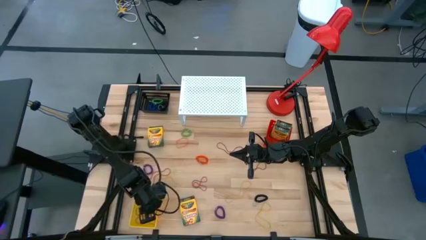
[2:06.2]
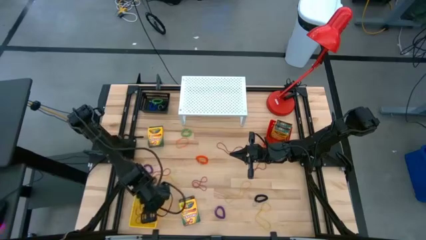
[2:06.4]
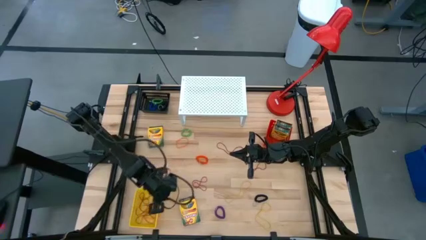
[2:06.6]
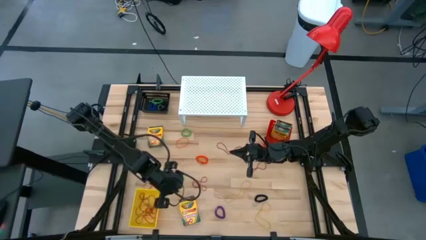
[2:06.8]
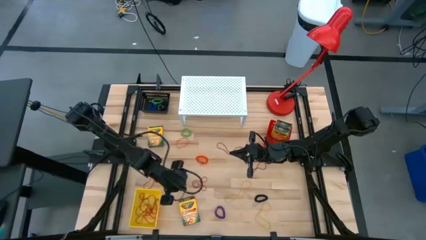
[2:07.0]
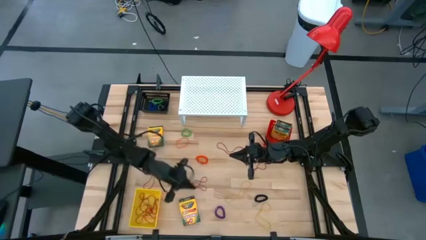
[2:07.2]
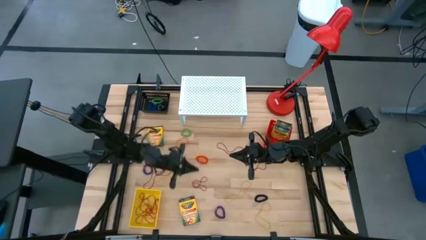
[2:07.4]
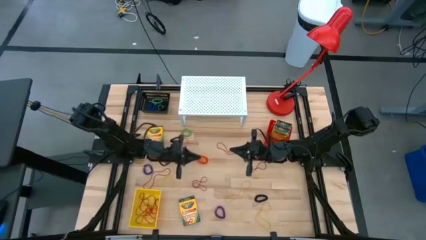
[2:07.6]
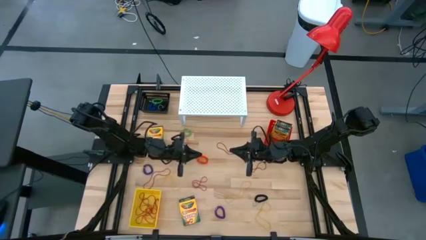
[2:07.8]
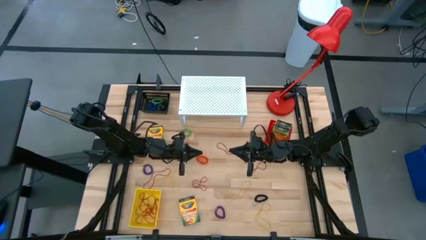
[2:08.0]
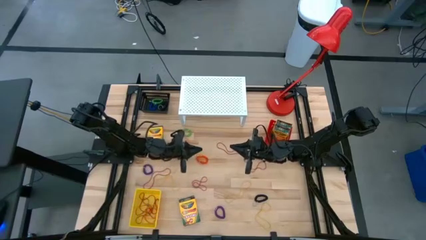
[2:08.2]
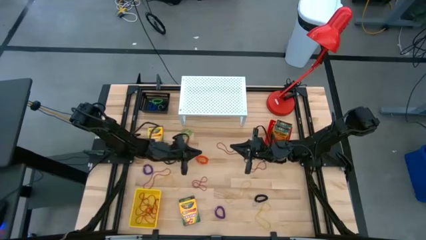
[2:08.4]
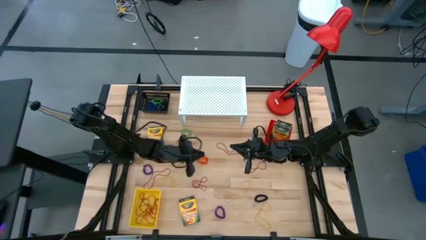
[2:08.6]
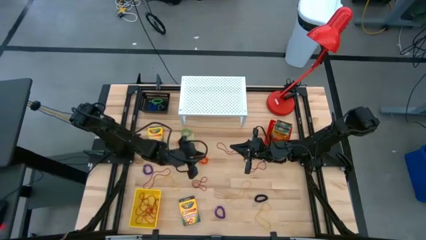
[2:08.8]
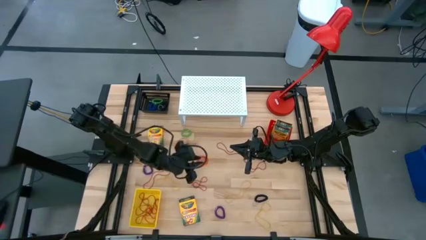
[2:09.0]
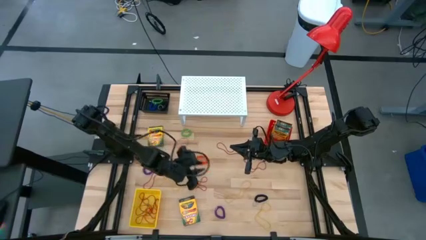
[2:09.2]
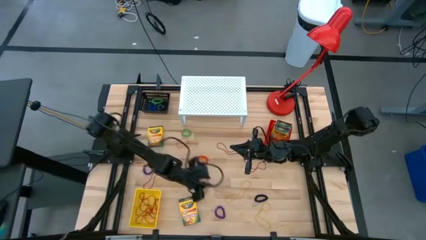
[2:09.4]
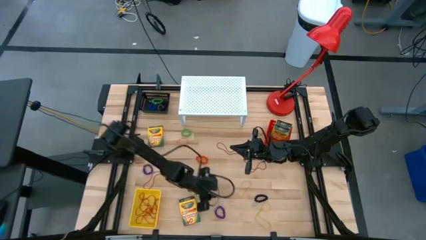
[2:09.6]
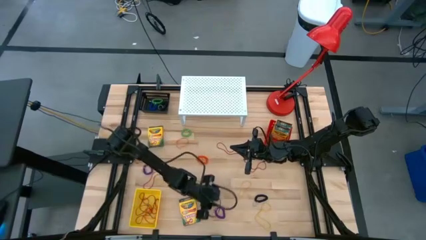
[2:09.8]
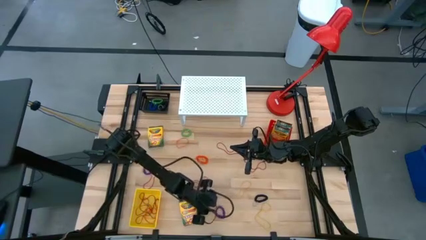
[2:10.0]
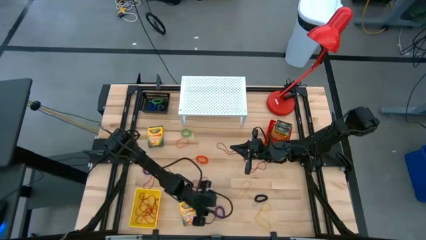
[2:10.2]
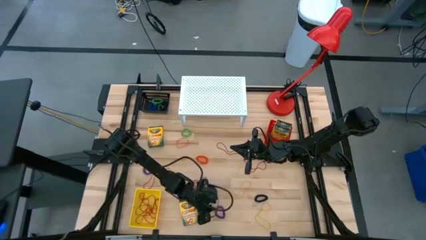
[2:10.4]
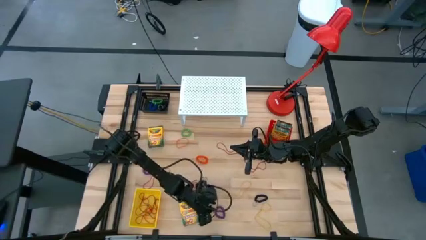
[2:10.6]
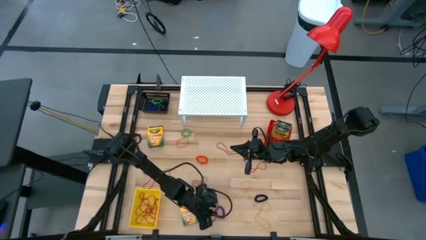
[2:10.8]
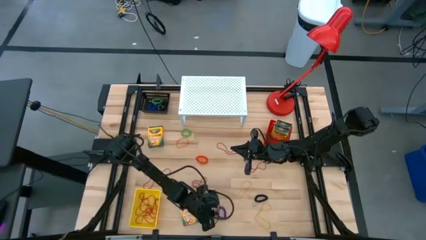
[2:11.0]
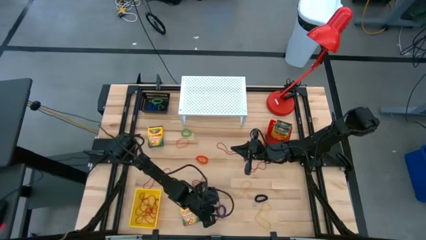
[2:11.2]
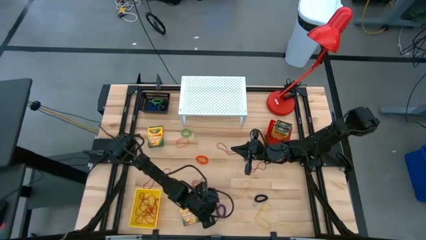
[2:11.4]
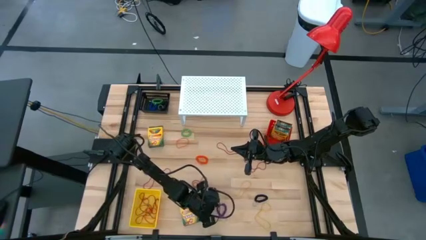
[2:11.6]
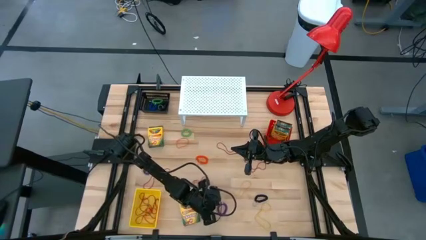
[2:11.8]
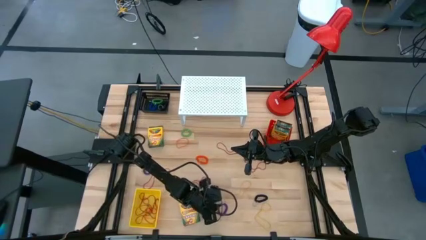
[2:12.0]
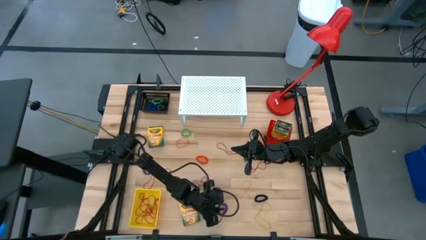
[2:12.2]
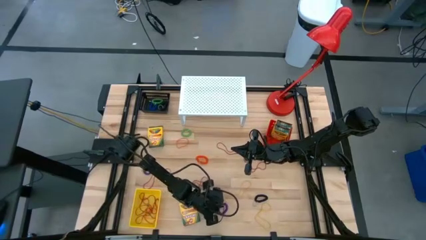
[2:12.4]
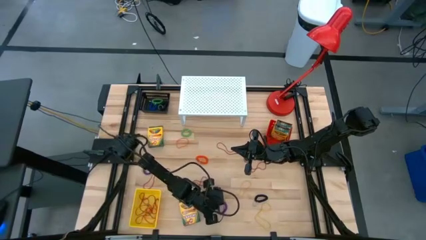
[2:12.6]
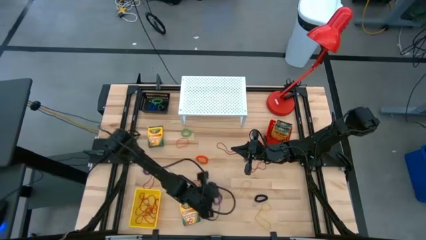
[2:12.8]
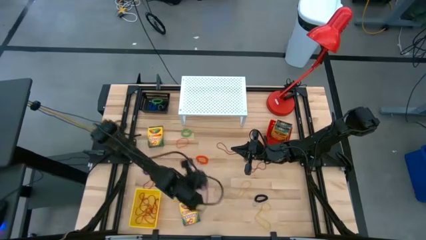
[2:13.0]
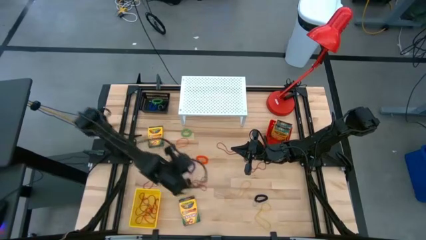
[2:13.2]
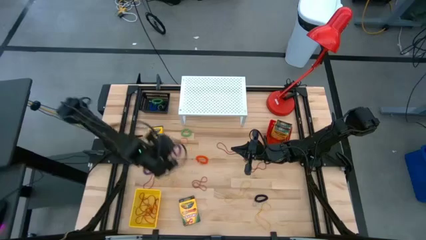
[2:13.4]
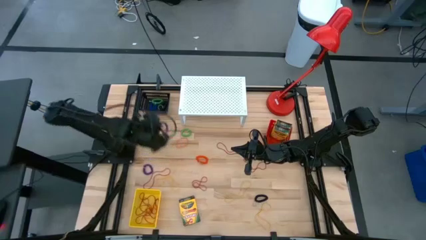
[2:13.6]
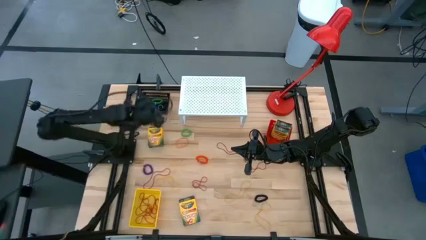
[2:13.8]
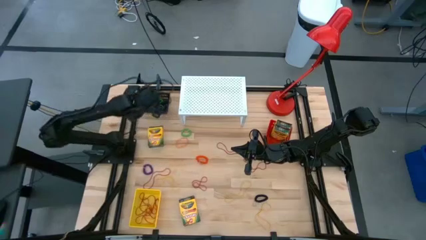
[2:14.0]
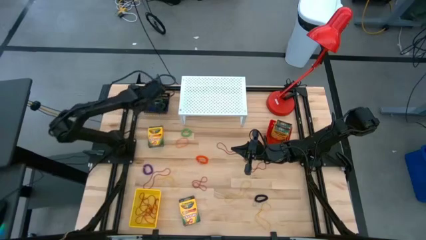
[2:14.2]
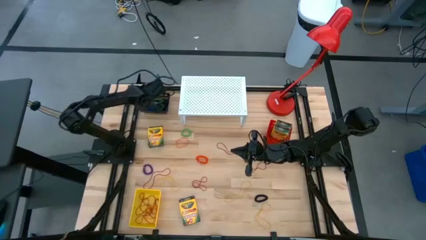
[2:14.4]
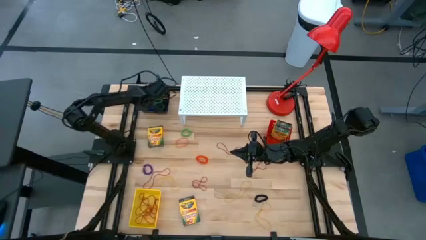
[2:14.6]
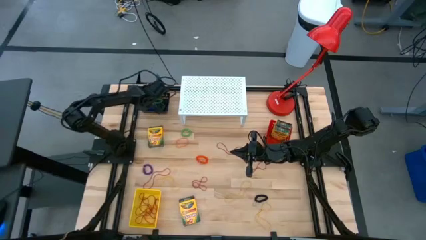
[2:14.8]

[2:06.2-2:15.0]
Task: Pick & Place Office Desk Supplies
Put the bottom purple spring rubber band into the black bin

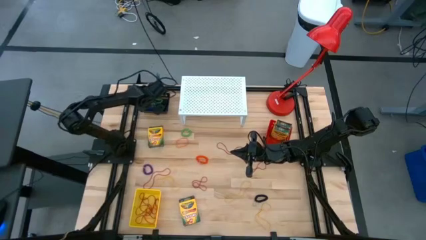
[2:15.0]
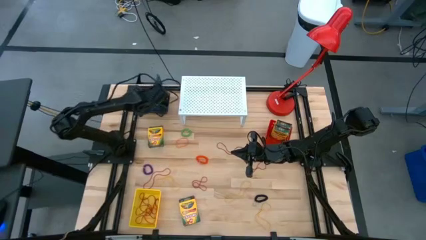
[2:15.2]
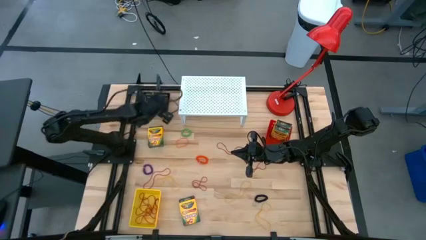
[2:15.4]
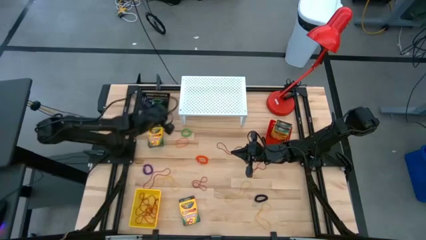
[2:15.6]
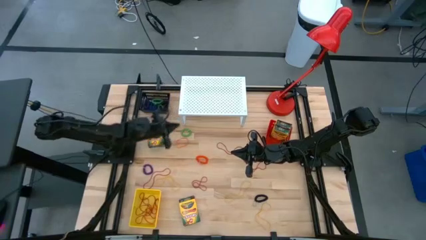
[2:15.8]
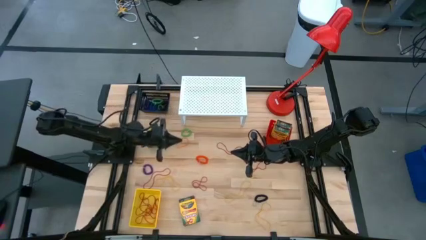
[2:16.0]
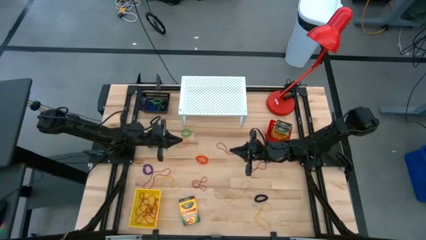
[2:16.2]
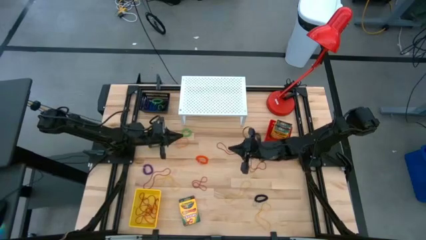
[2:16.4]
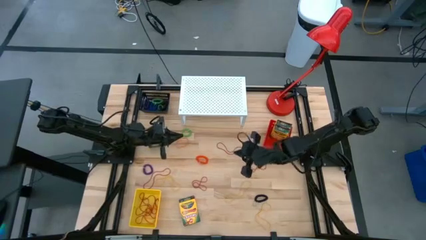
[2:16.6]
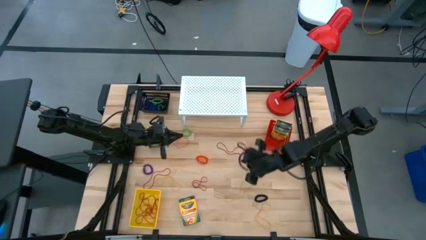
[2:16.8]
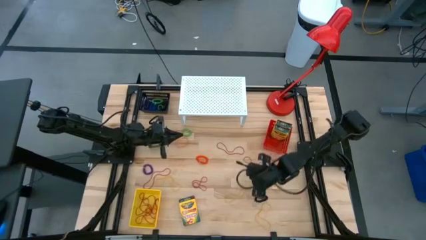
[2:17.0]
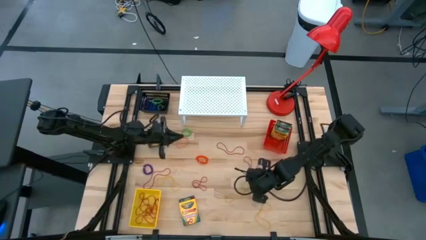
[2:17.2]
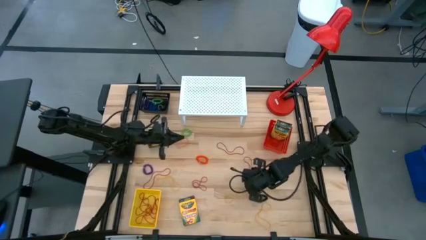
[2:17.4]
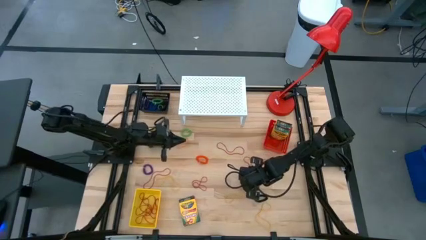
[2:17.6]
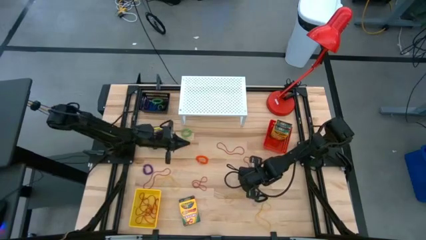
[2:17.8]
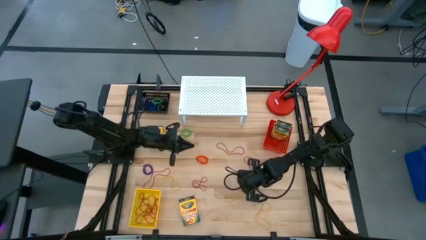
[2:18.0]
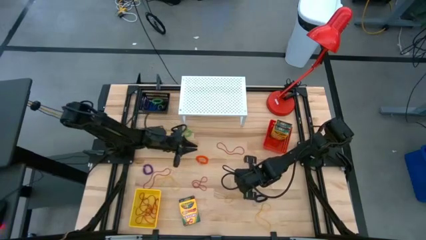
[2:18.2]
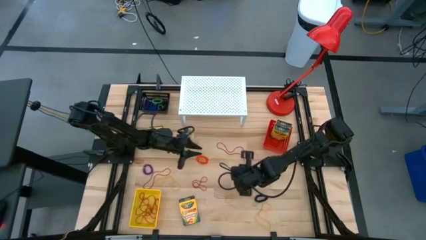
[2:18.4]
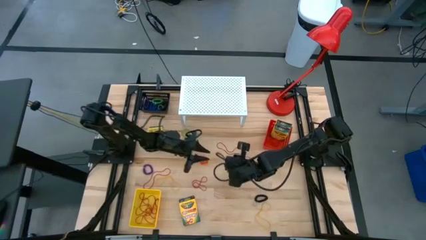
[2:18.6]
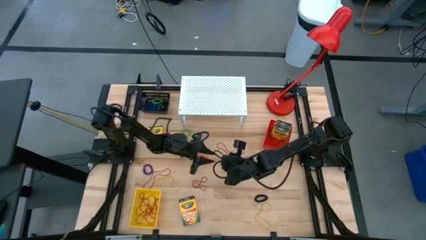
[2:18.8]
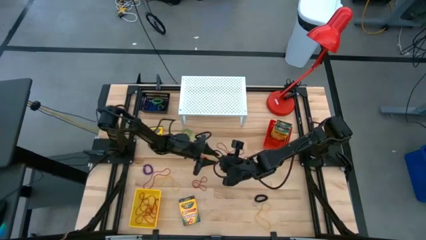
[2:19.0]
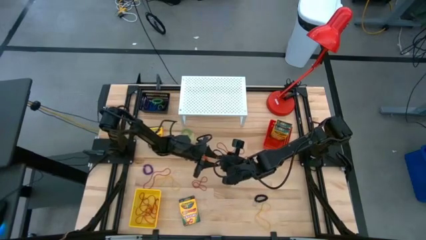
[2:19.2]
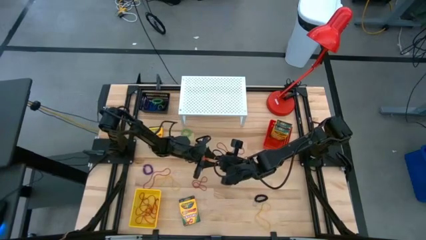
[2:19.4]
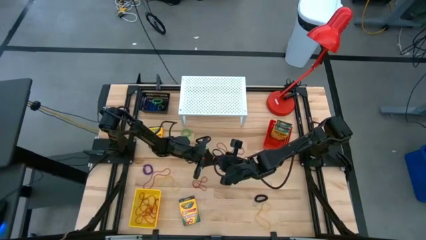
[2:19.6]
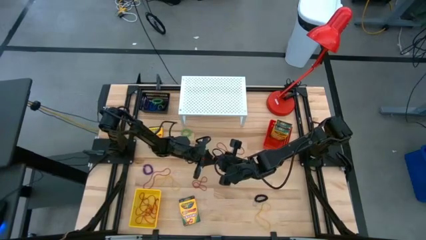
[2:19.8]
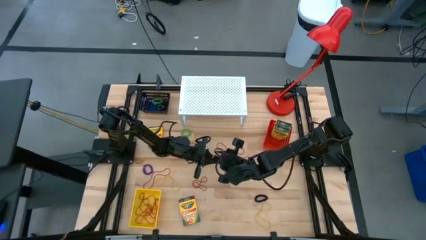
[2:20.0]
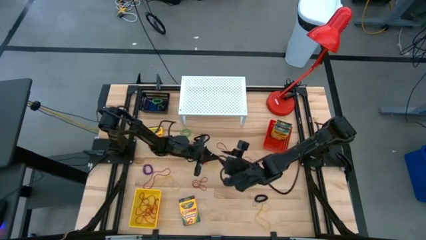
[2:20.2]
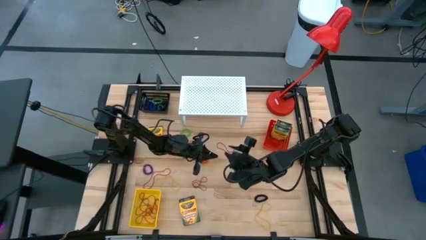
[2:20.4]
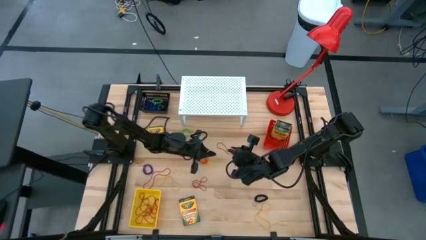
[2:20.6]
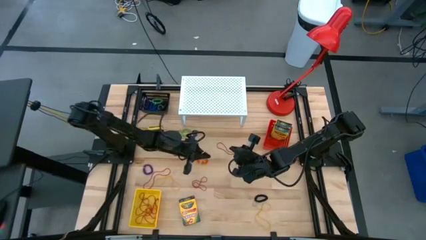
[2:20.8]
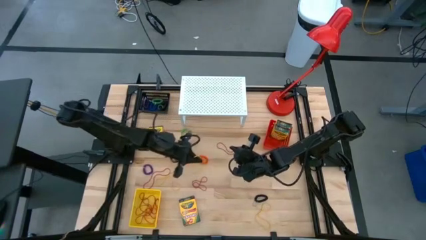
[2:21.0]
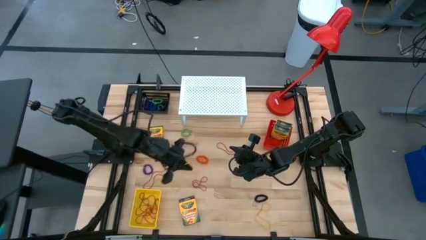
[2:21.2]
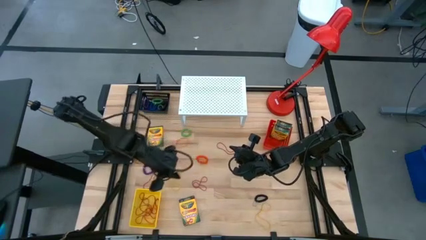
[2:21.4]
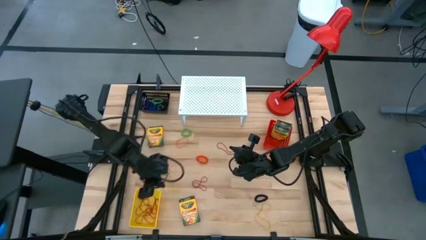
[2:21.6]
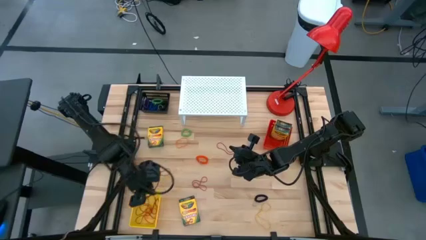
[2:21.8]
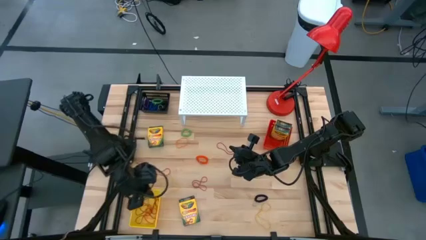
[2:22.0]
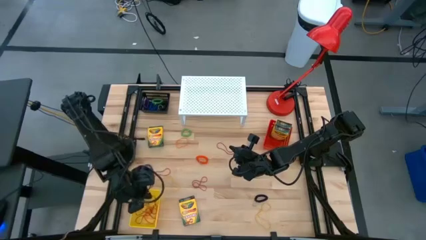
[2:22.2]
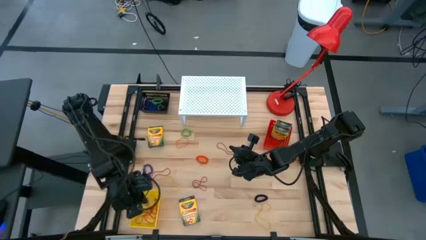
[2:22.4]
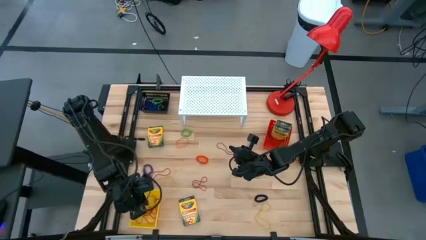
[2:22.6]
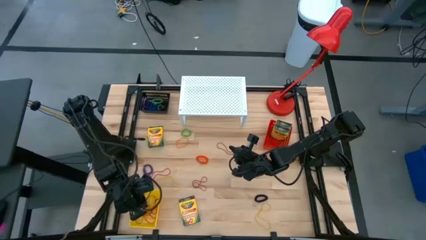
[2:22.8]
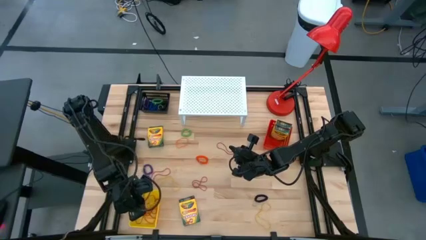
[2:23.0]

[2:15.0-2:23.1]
Put the right yellow rubber band into the yellow bin
